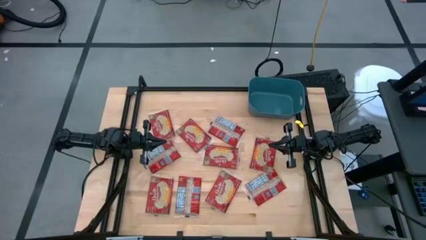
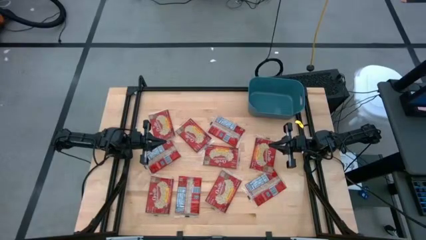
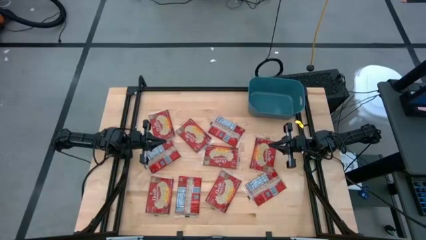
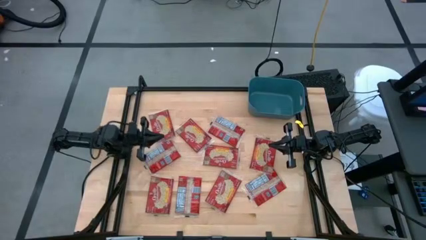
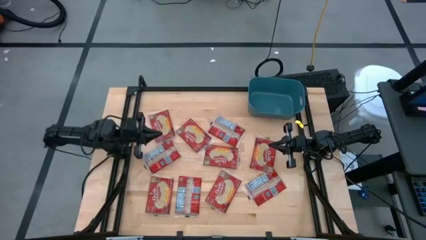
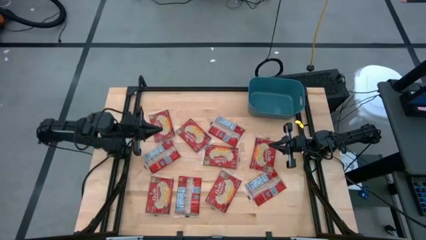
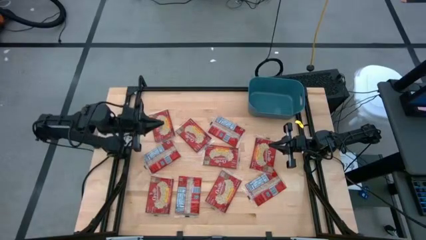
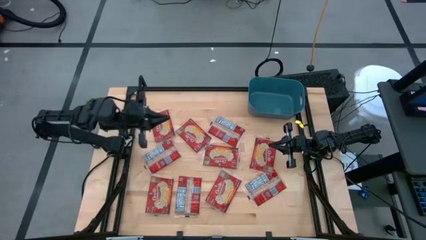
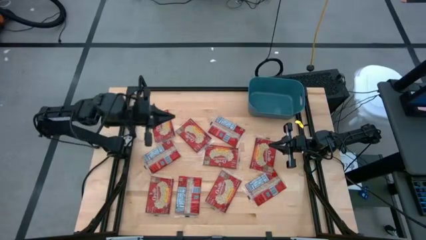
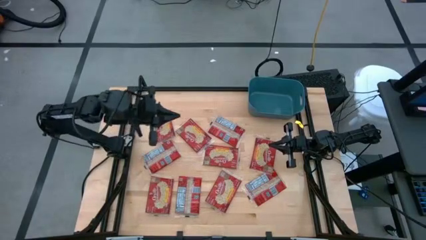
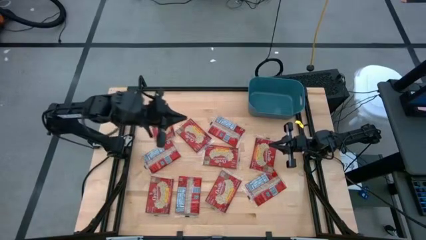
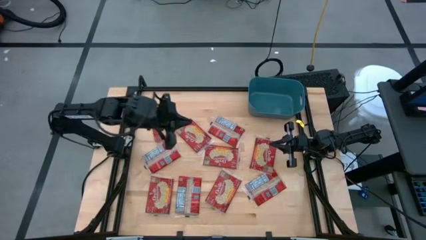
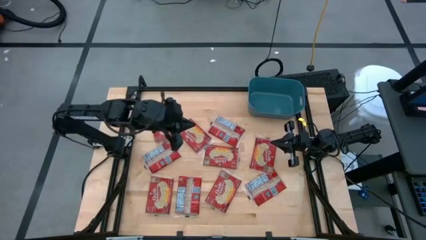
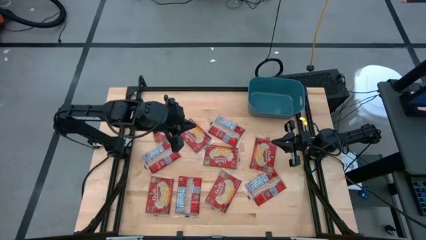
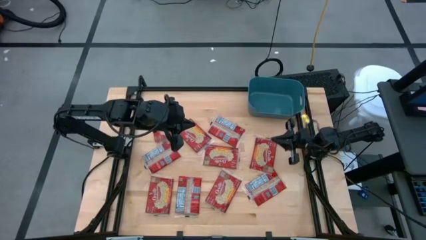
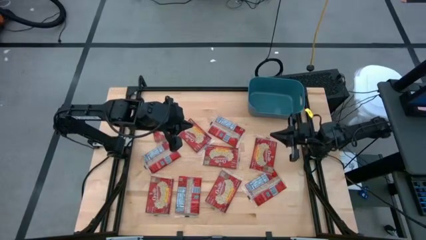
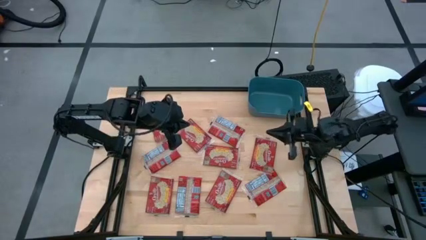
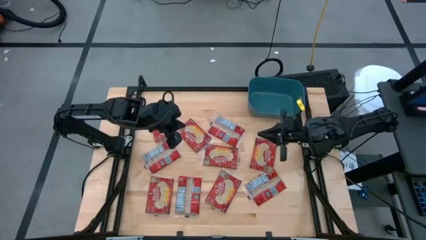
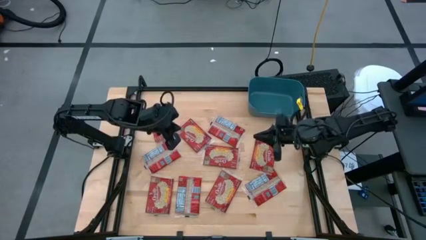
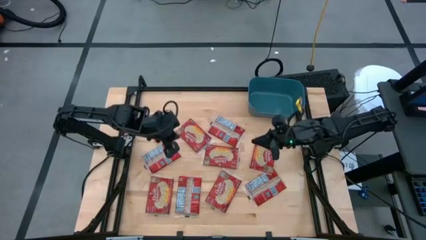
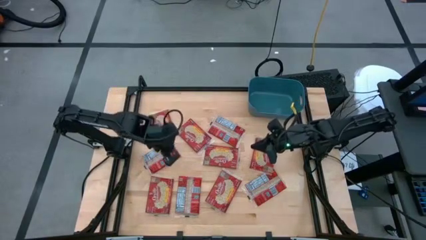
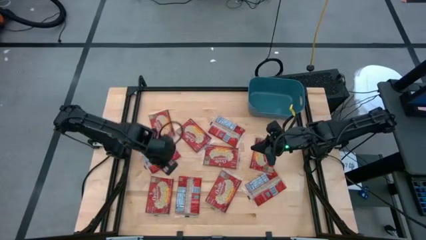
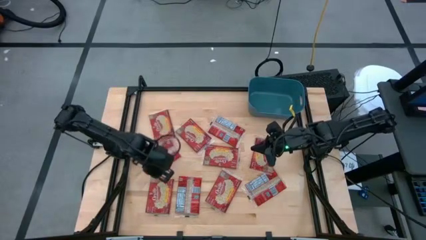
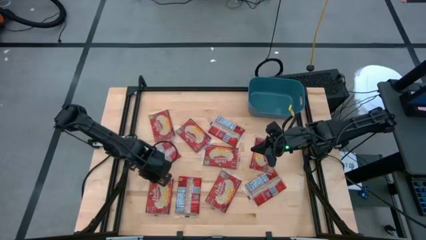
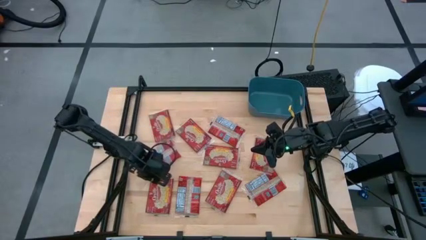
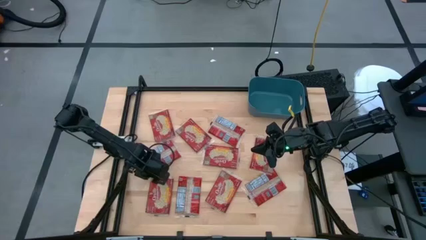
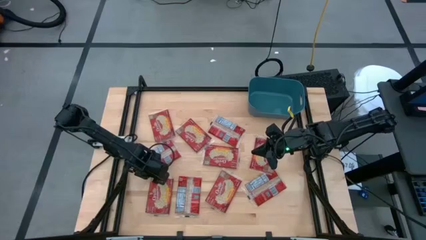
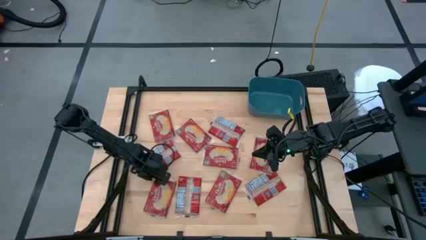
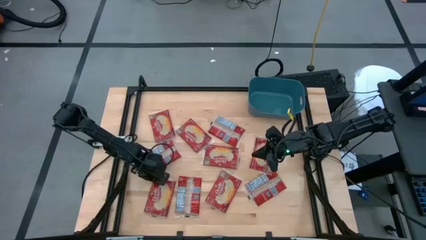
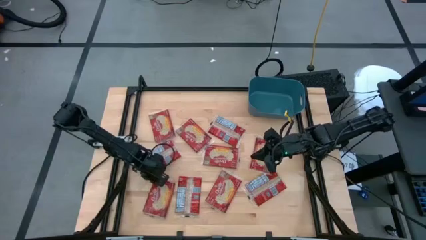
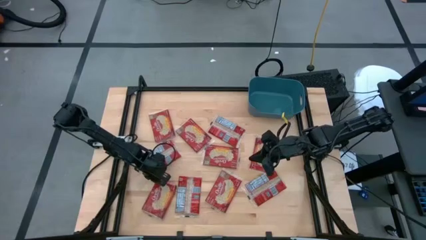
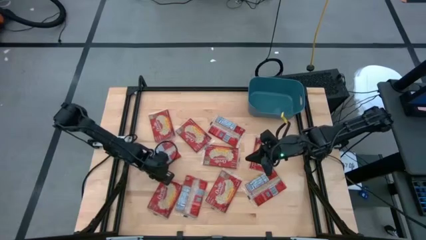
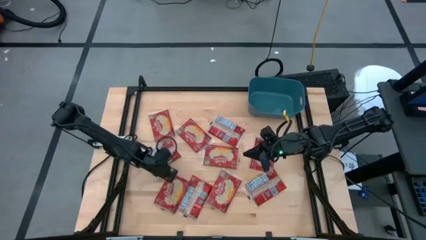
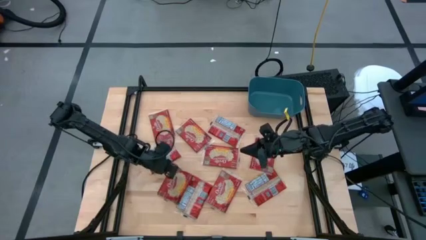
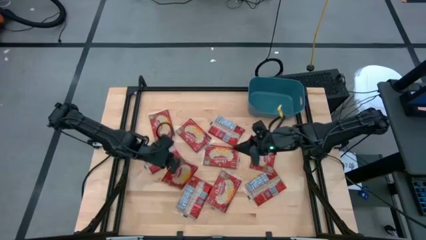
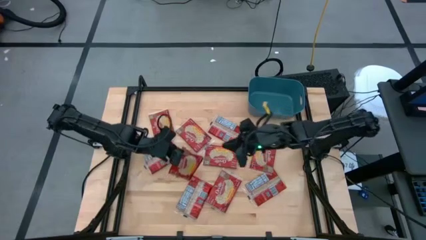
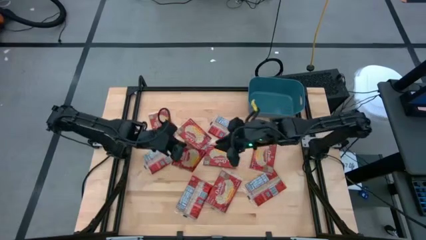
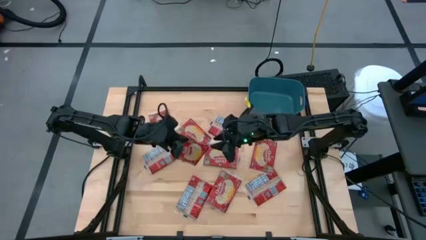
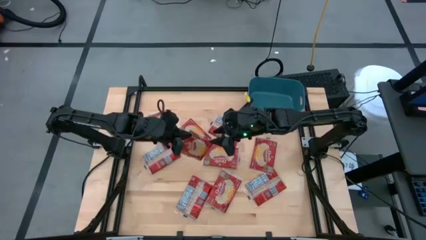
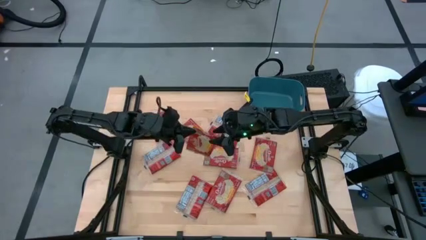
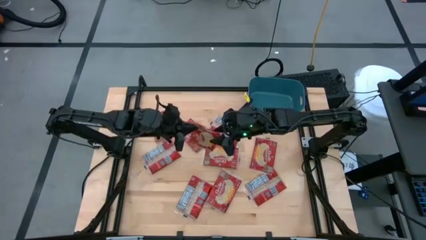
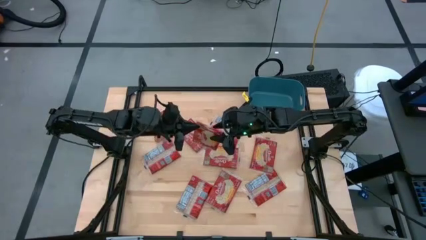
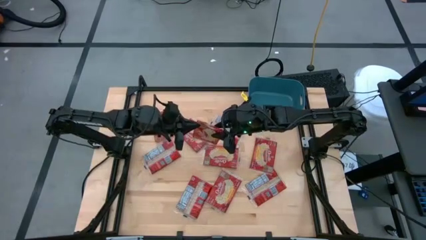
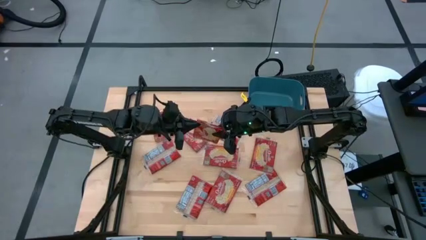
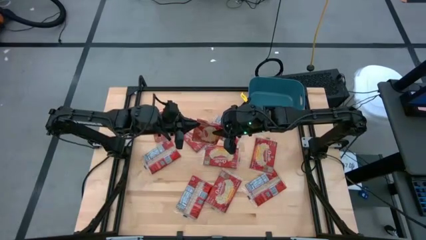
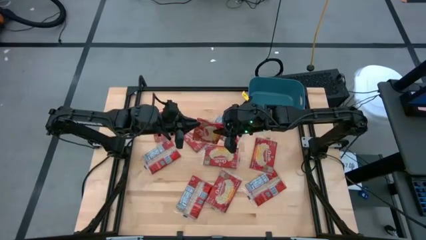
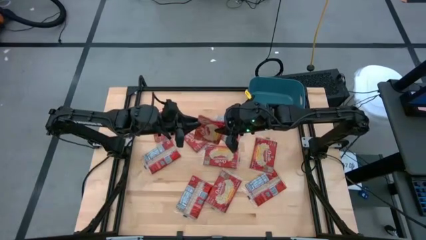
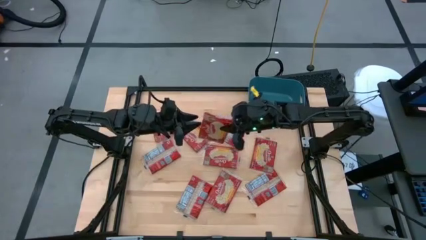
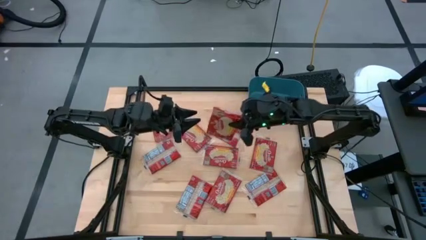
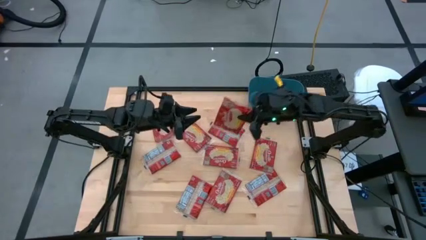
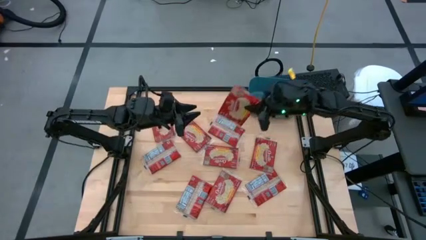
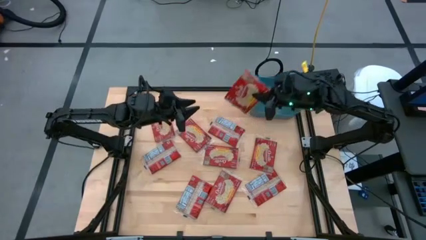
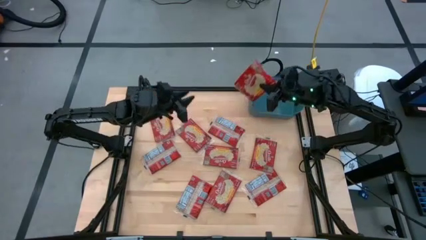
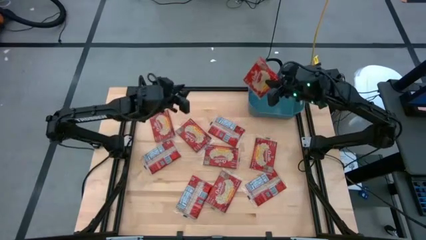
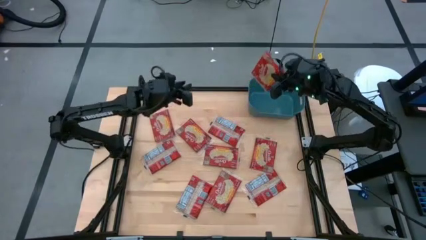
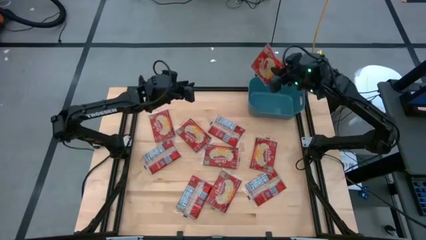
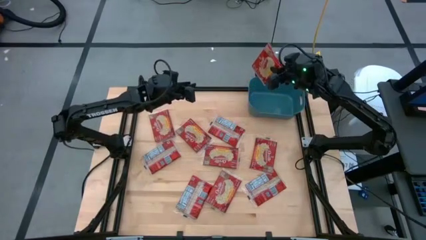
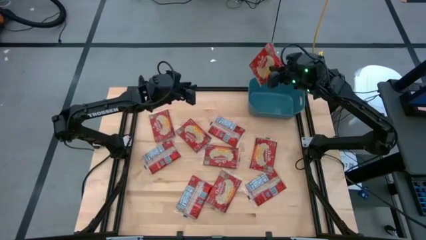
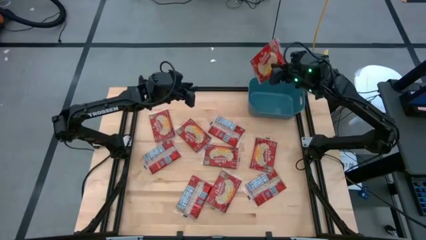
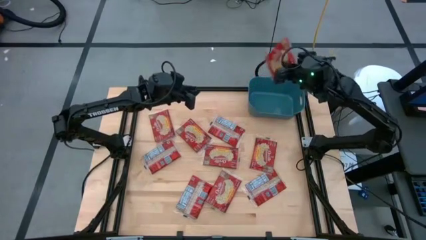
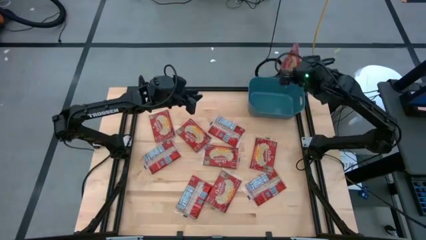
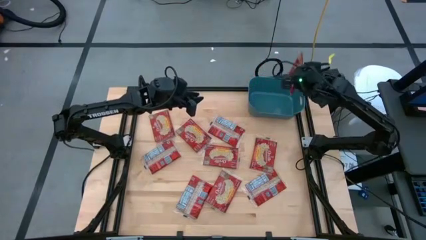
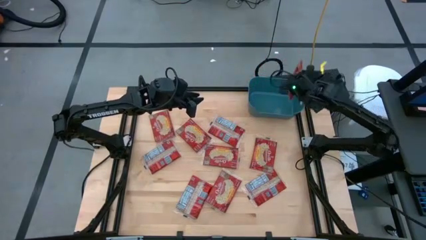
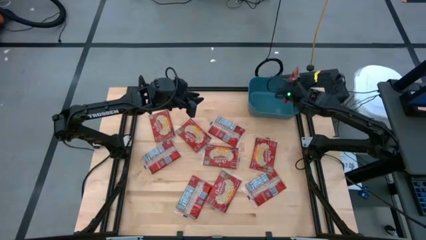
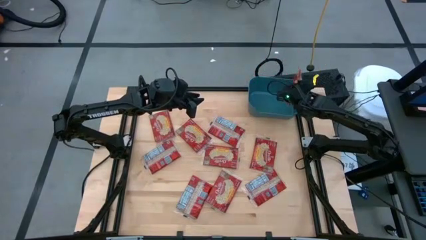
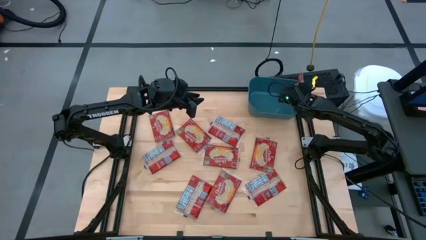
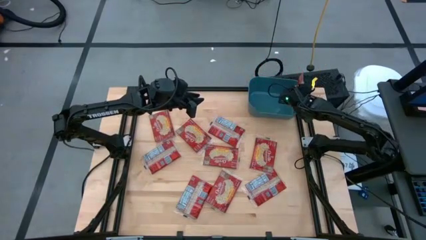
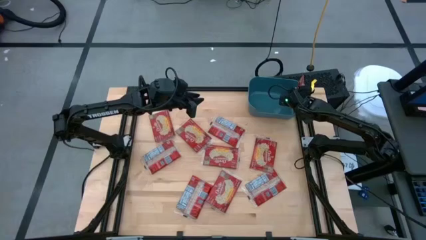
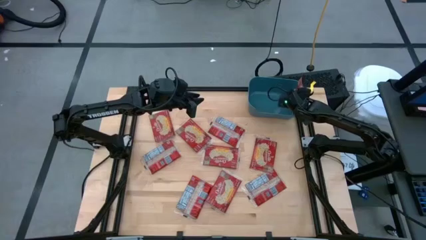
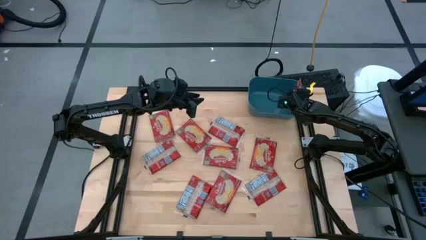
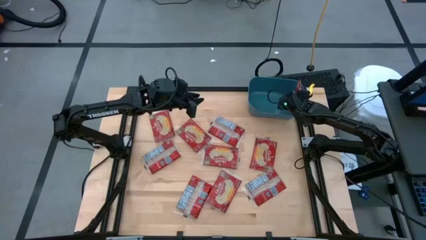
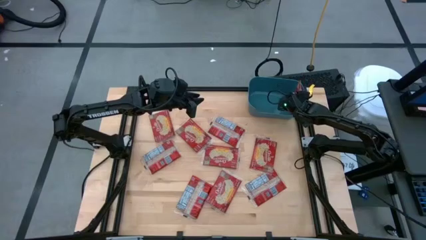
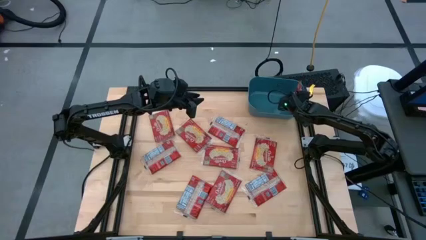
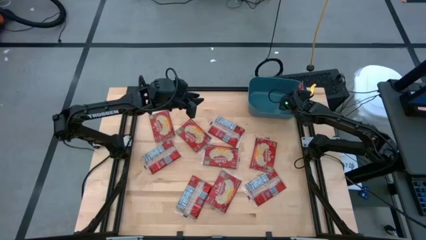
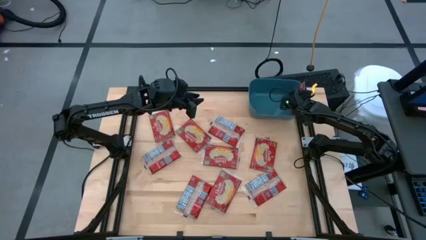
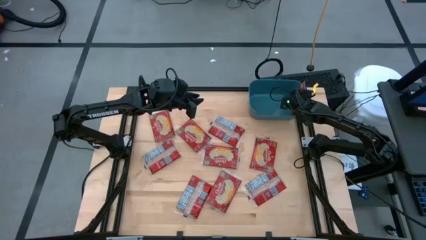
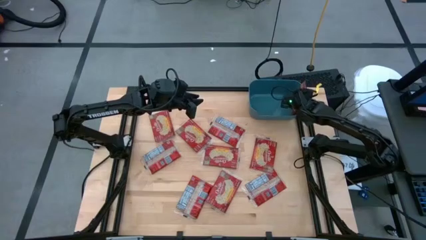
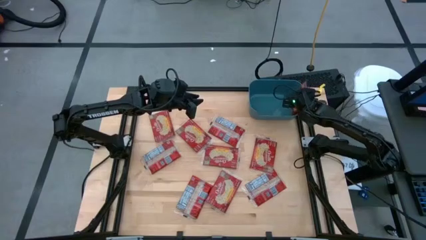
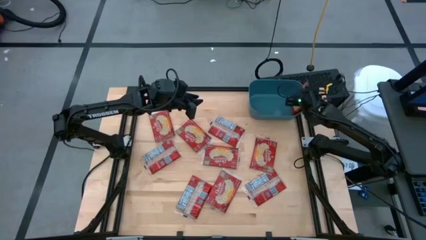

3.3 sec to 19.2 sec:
Task: Sort popcorn bags into baskets
Put the popcorn bag into the blue bin
